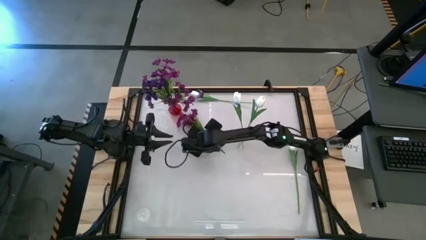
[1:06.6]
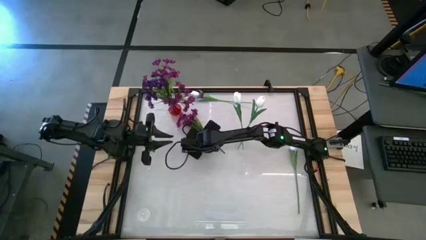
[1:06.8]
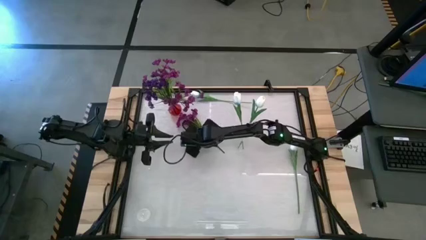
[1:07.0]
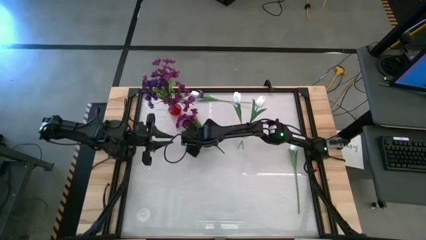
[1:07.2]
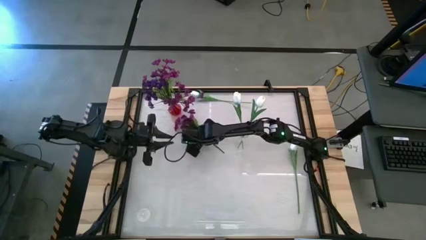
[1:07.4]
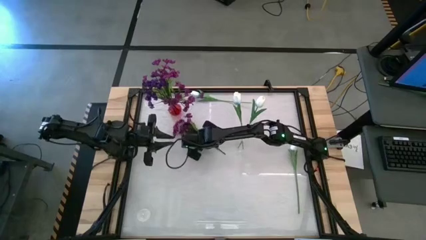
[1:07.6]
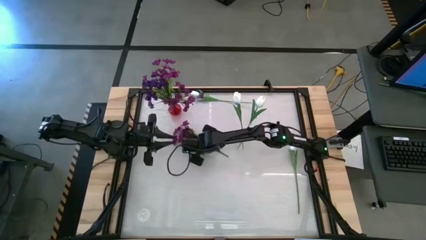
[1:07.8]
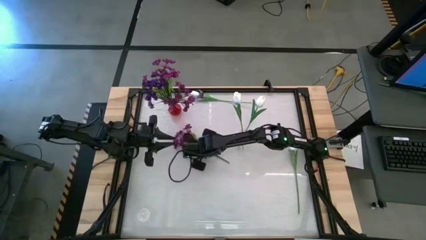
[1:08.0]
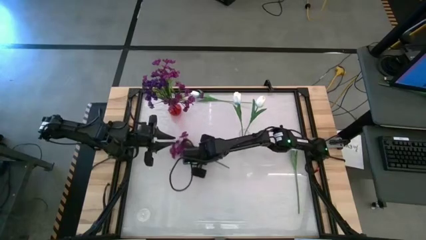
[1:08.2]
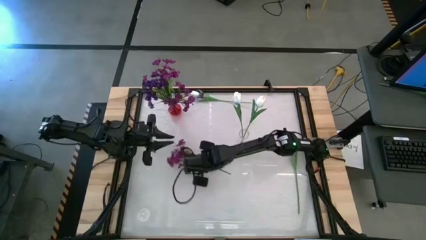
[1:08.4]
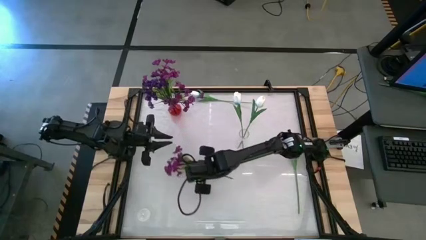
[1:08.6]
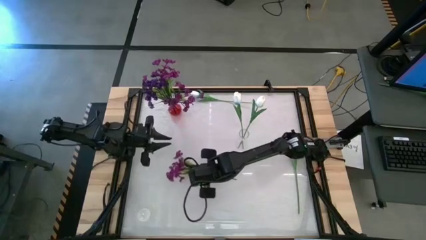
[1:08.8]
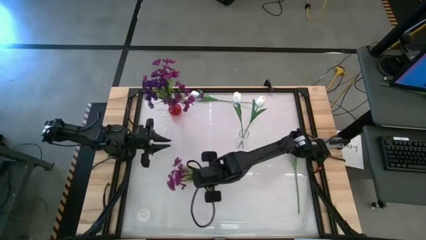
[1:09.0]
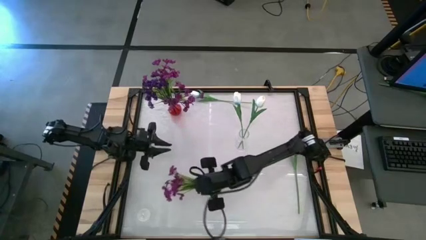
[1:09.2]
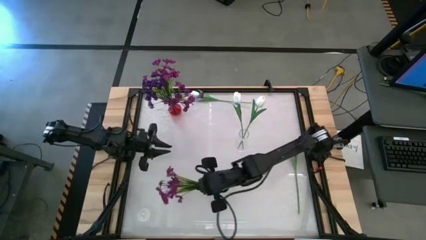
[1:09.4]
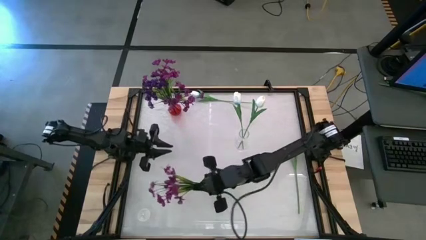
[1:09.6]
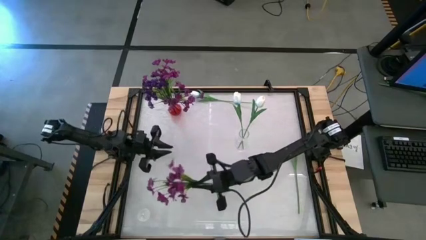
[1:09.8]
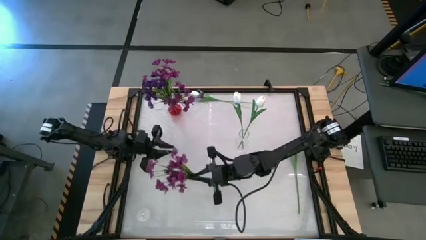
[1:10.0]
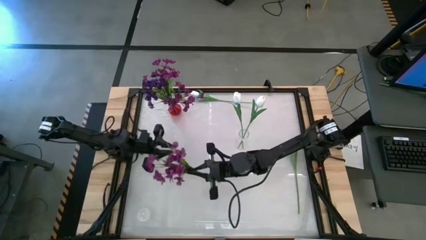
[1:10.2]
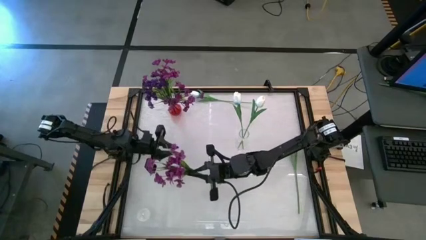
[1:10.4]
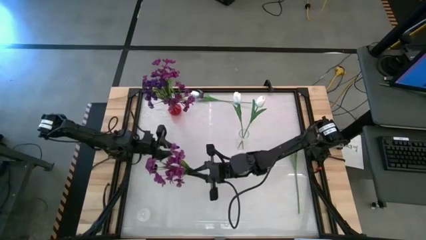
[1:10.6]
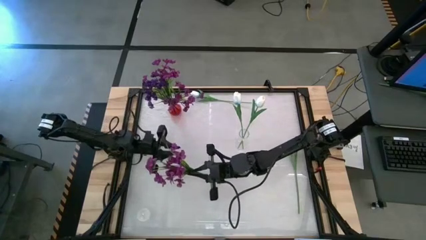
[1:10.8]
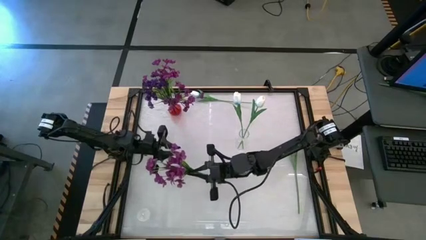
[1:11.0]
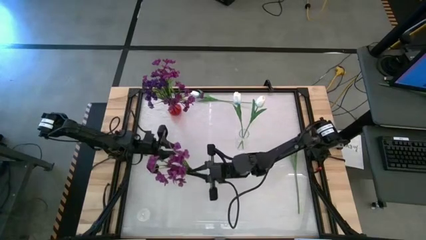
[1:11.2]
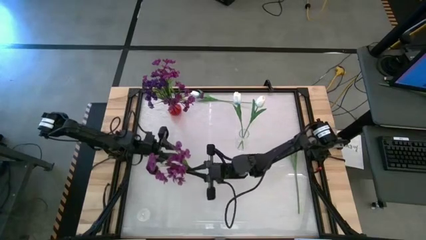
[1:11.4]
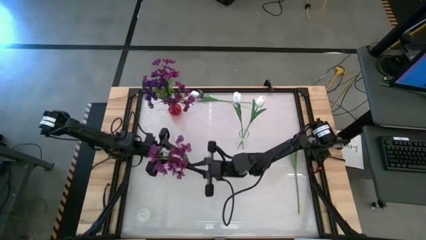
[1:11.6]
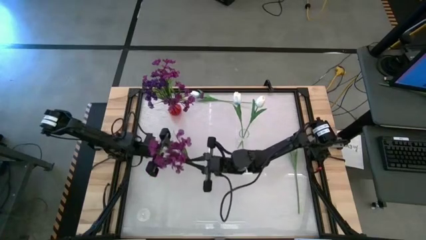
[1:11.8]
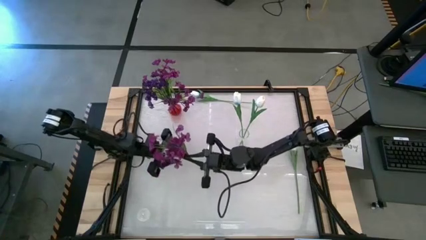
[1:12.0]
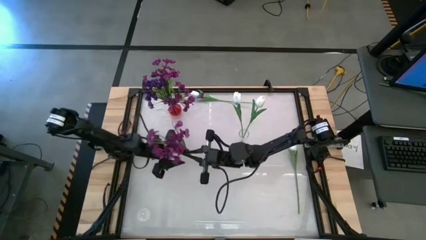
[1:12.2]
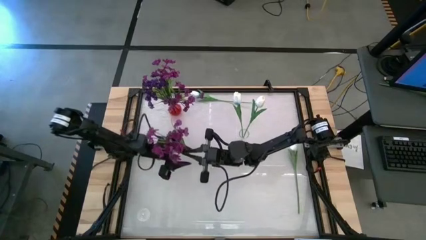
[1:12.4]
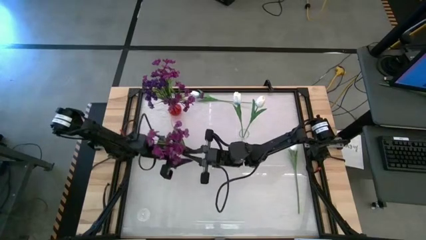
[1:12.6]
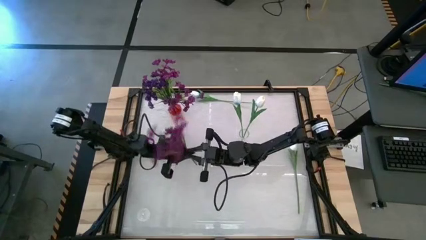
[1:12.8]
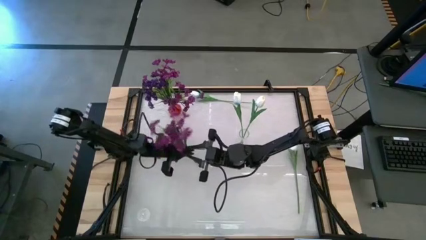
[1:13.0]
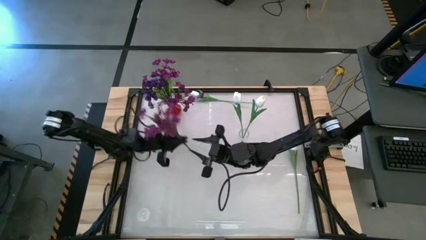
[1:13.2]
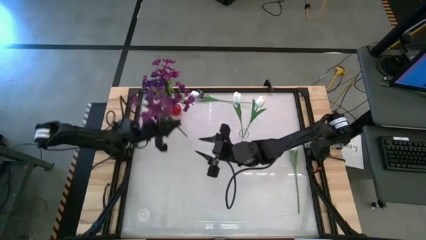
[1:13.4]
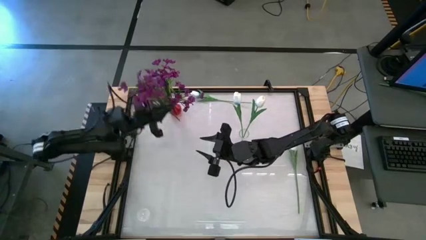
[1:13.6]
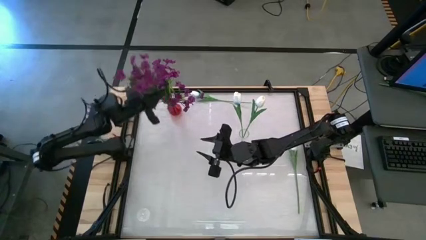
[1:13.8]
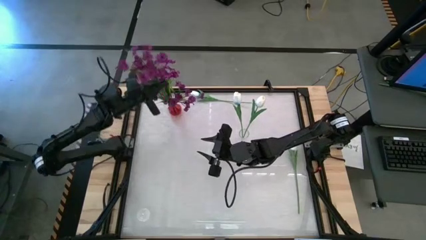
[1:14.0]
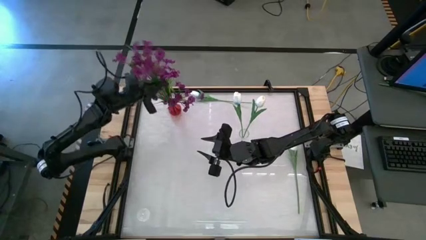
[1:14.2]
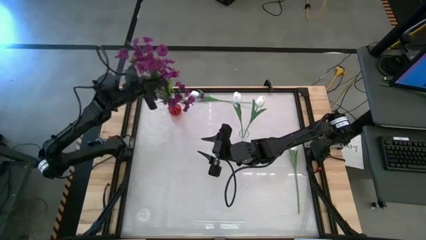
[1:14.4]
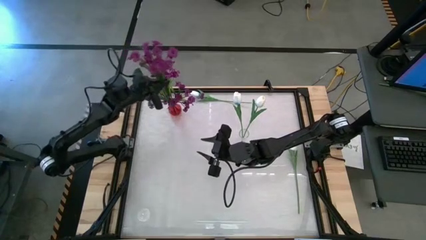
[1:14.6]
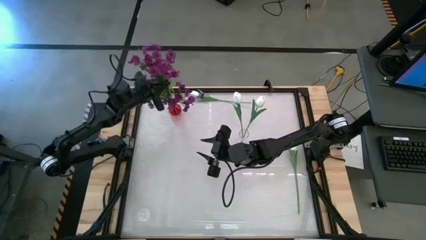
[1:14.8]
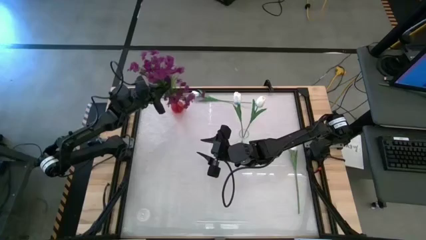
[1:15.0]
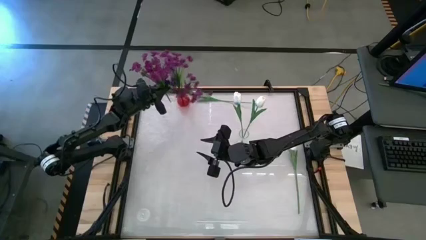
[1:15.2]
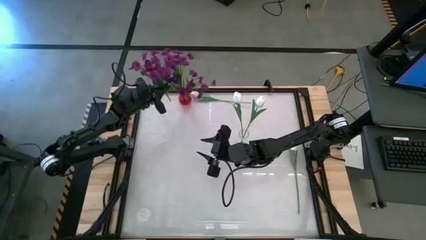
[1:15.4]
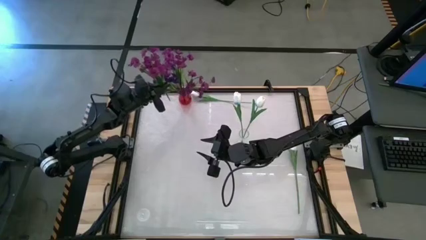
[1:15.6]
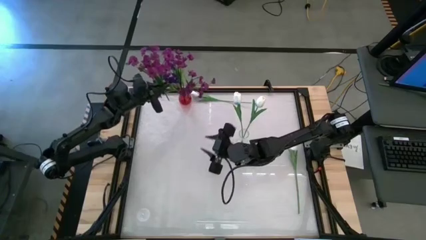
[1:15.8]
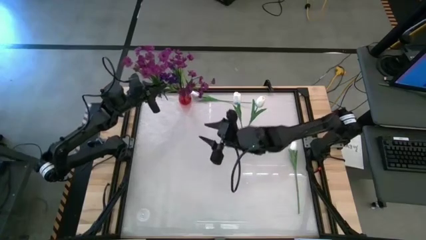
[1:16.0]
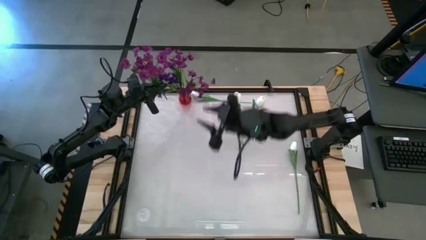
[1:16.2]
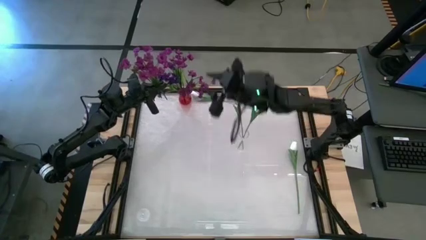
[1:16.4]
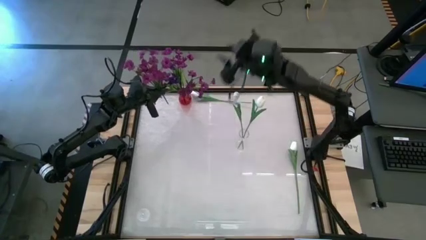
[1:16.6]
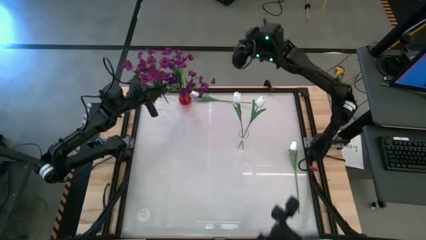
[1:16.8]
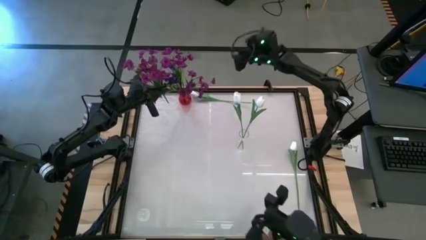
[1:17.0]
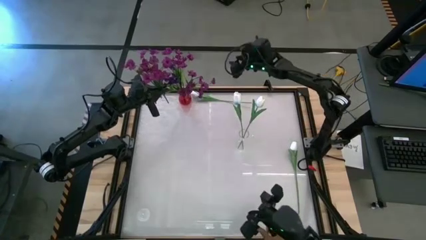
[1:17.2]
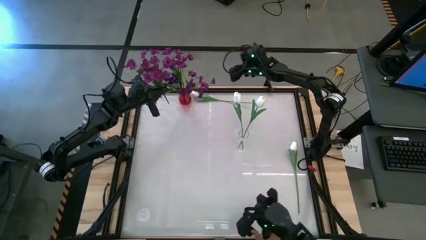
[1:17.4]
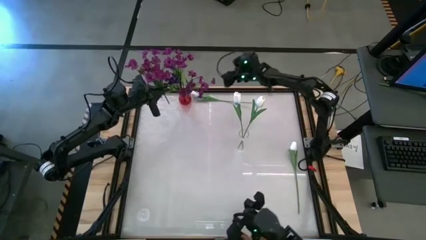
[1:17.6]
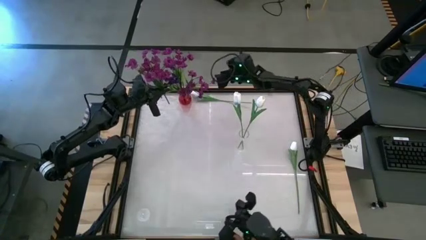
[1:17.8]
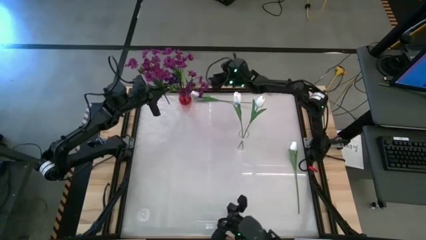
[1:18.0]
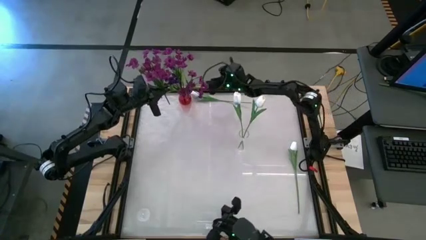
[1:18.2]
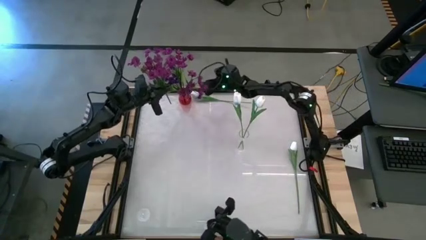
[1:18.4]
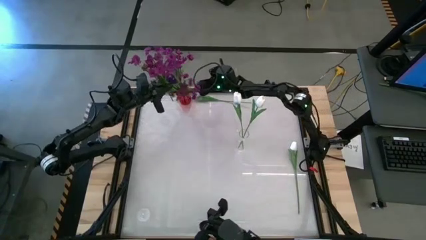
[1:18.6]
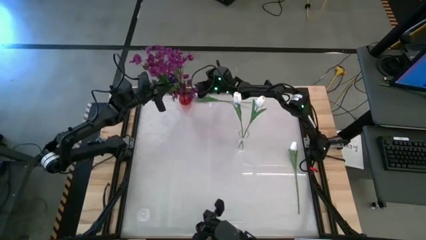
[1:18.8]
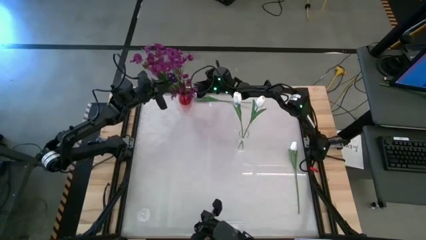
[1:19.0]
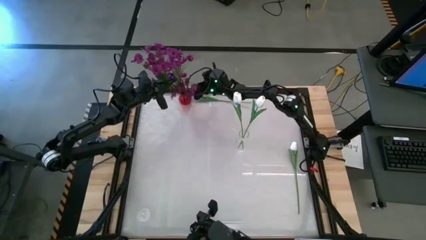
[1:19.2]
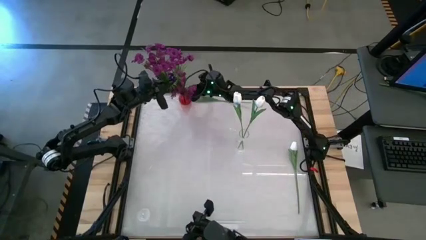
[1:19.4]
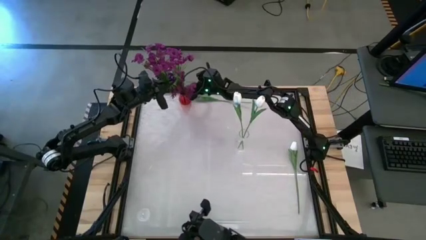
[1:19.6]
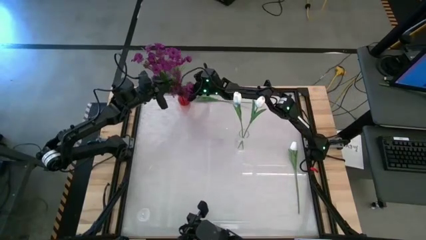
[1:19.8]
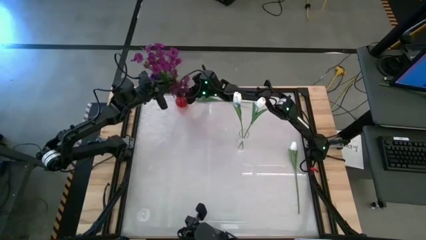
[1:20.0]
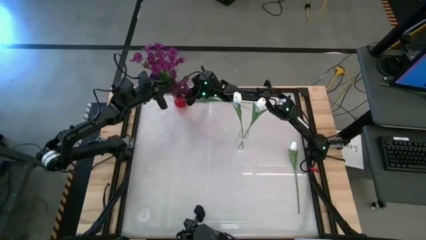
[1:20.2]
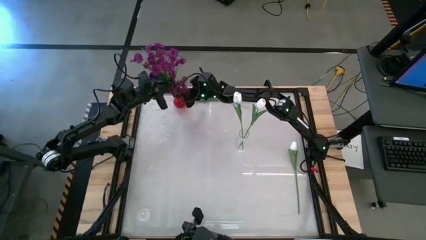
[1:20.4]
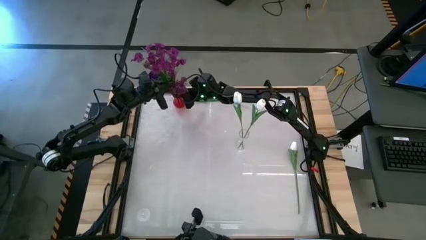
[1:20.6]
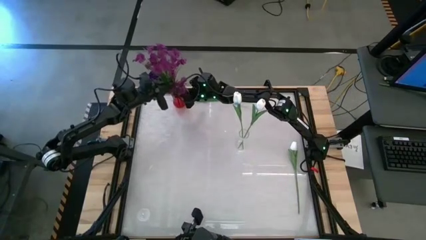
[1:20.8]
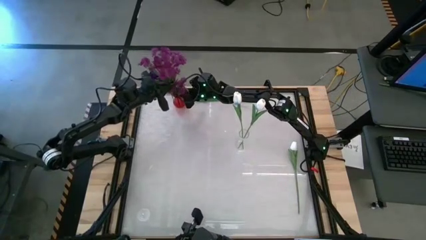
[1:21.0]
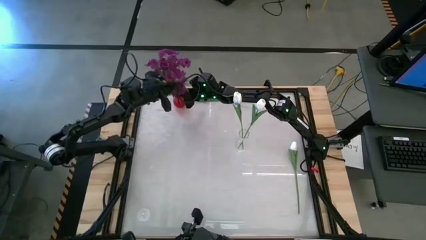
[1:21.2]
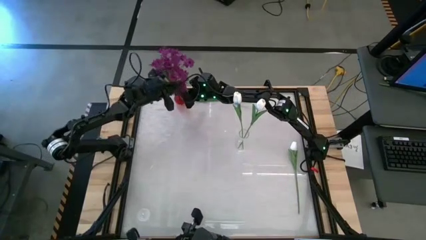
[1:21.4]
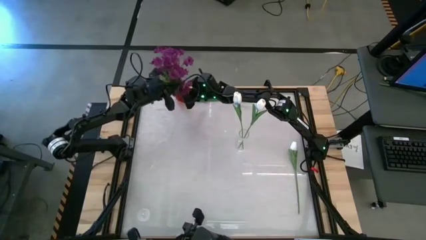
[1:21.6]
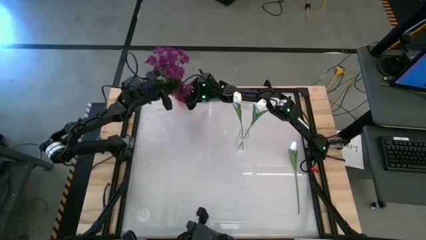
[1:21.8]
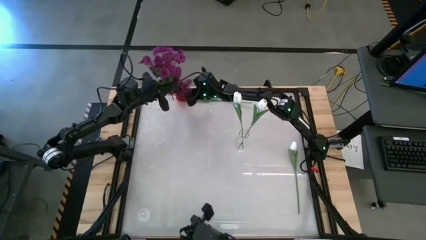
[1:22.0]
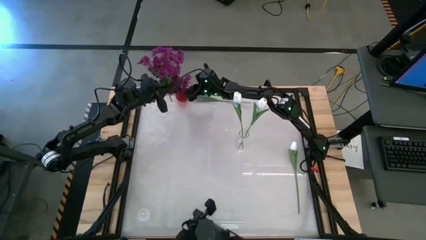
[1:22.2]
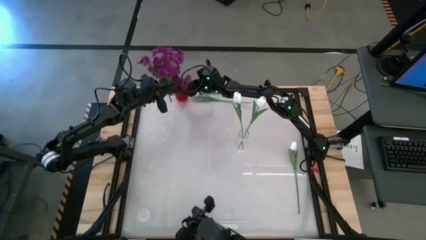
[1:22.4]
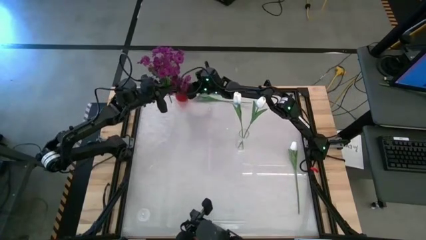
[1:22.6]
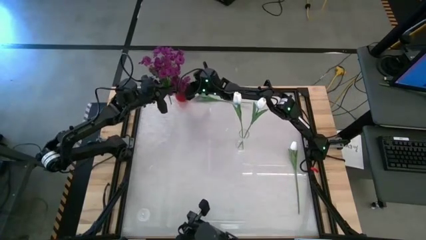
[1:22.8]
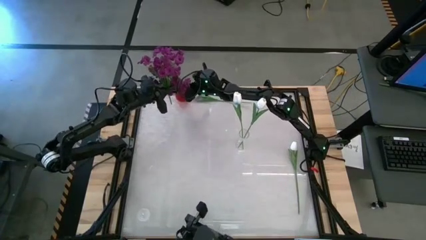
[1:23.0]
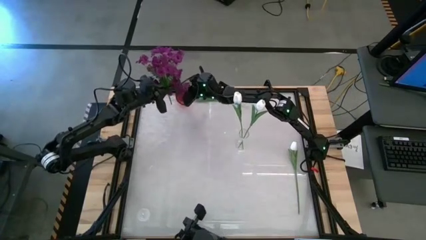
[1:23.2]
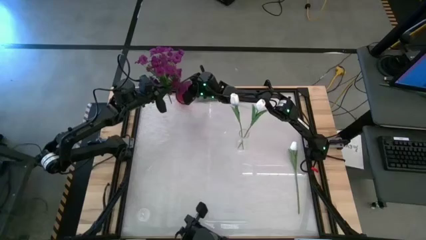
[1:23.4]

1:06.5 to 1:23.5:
Task: Sort flowers into vase by color
Put the light purple flower into the red vase
